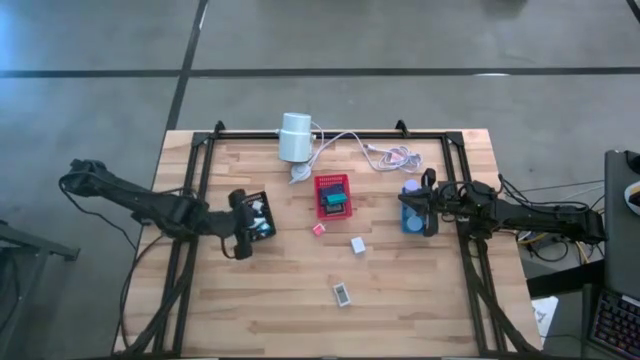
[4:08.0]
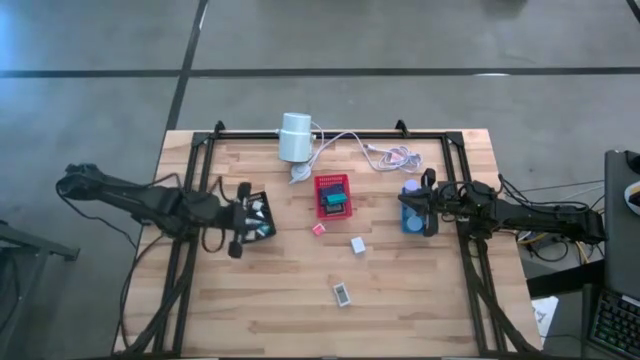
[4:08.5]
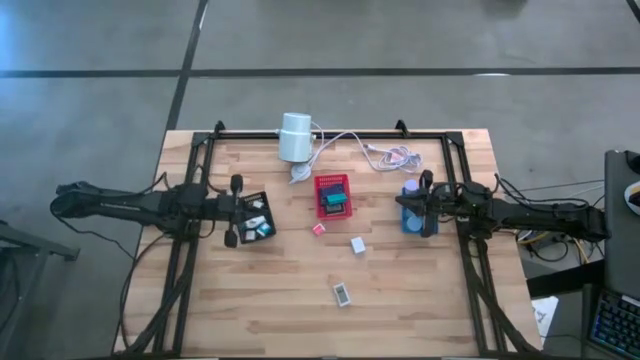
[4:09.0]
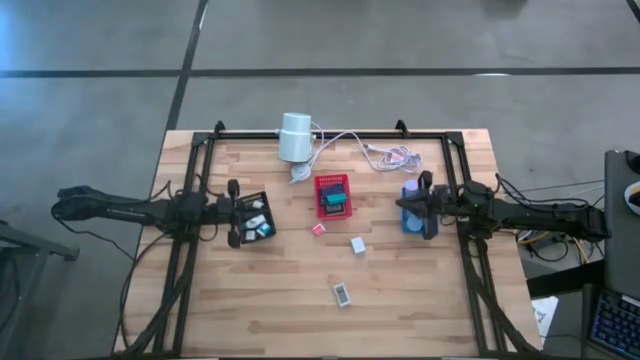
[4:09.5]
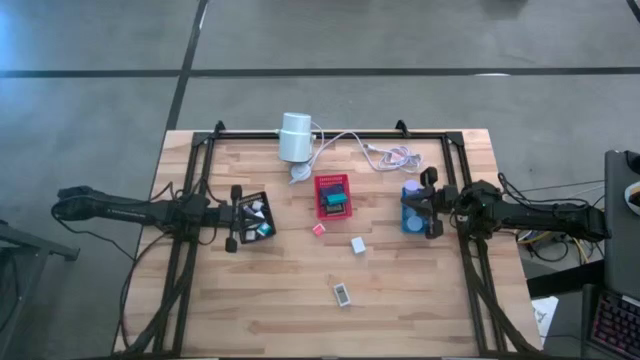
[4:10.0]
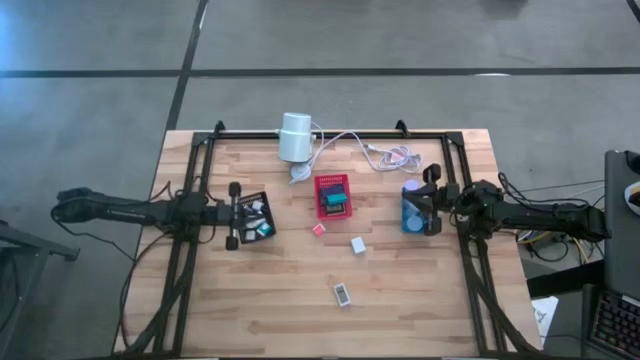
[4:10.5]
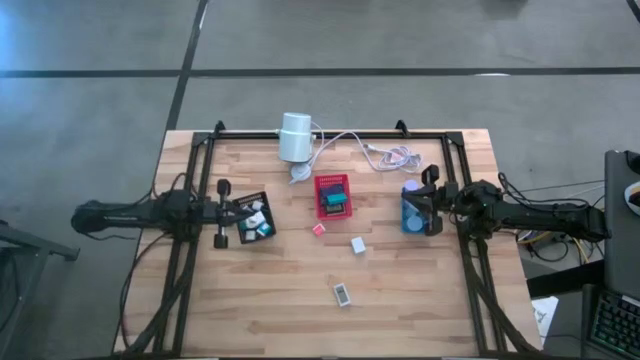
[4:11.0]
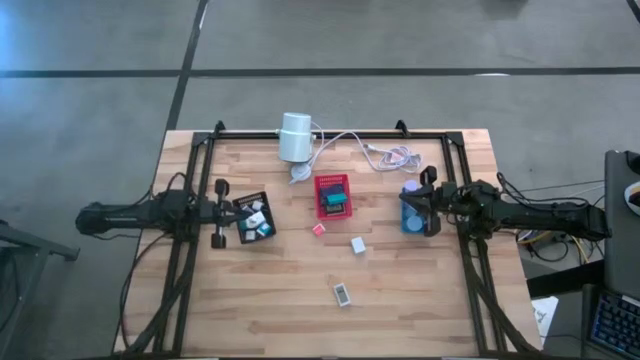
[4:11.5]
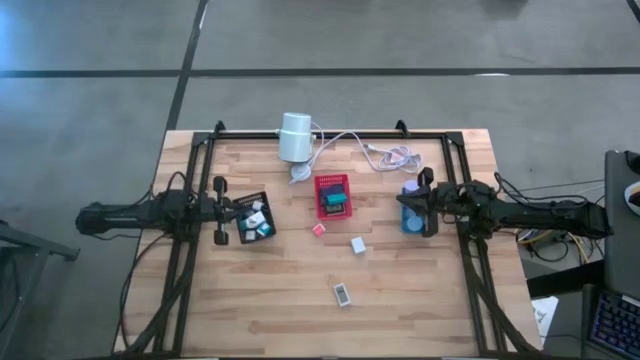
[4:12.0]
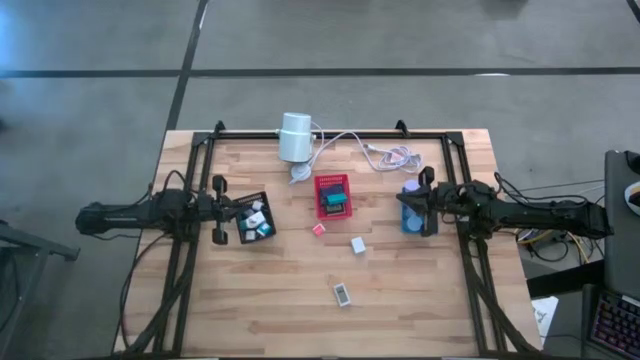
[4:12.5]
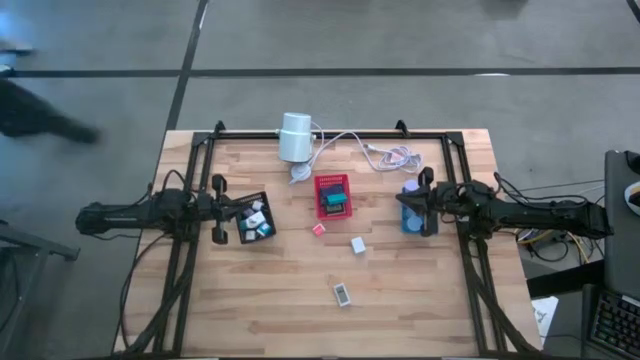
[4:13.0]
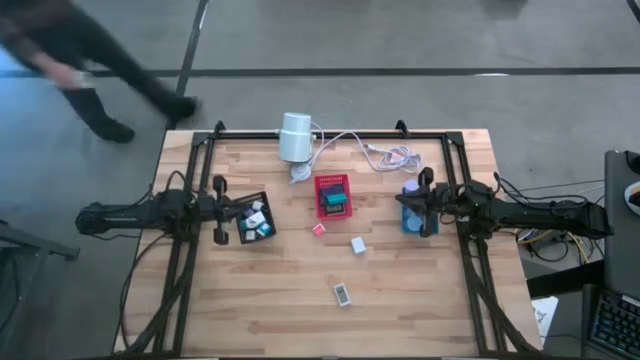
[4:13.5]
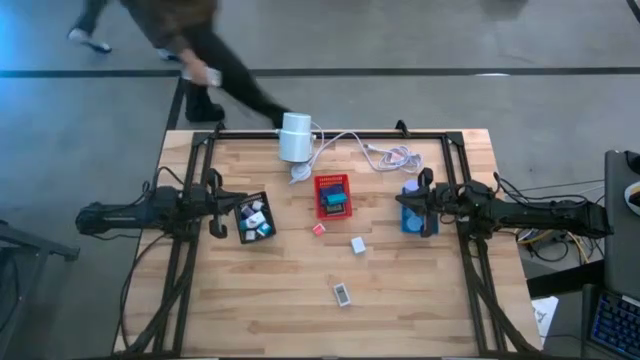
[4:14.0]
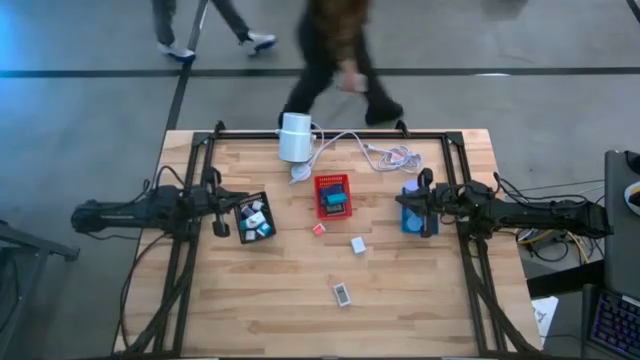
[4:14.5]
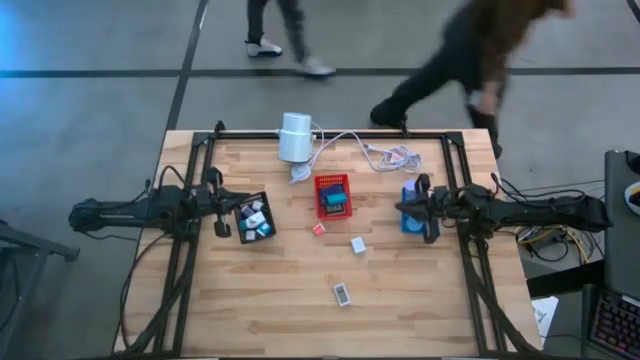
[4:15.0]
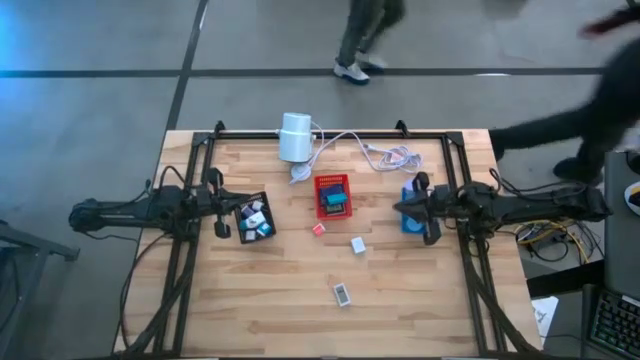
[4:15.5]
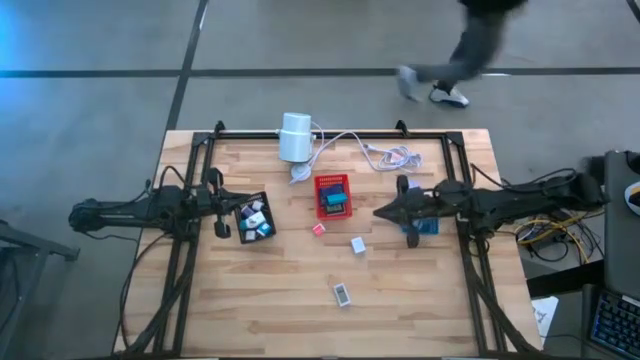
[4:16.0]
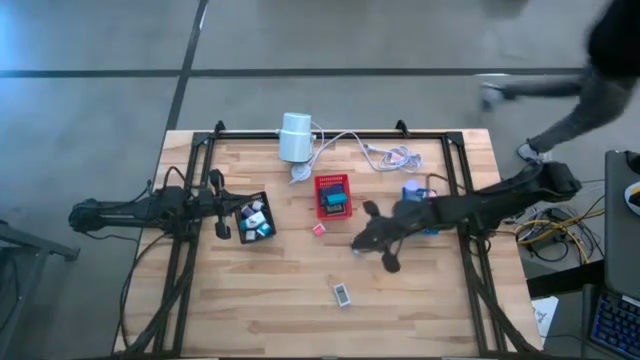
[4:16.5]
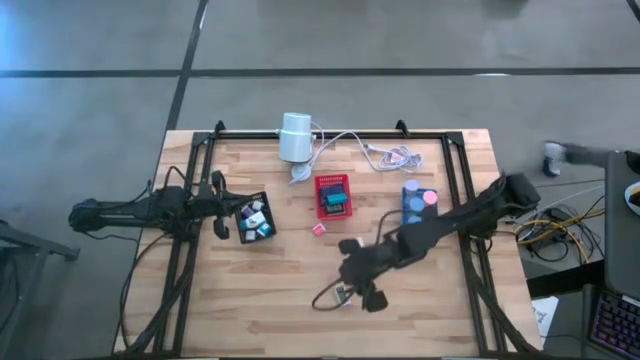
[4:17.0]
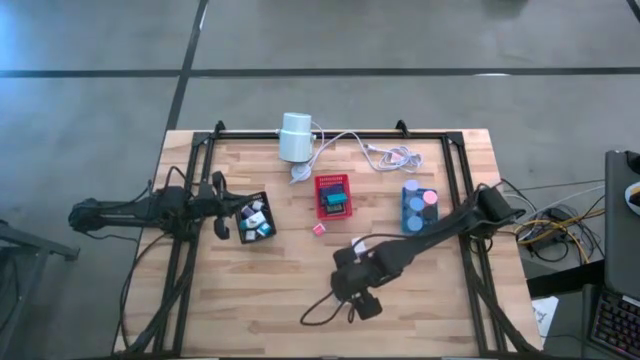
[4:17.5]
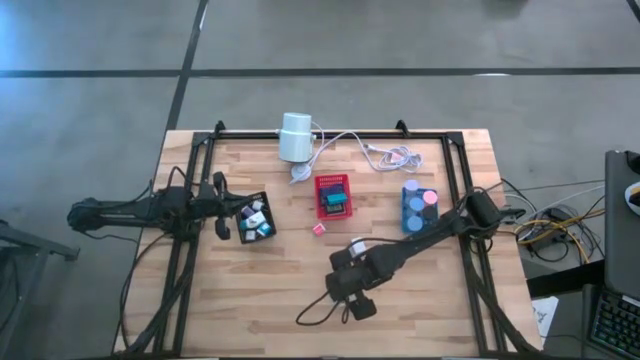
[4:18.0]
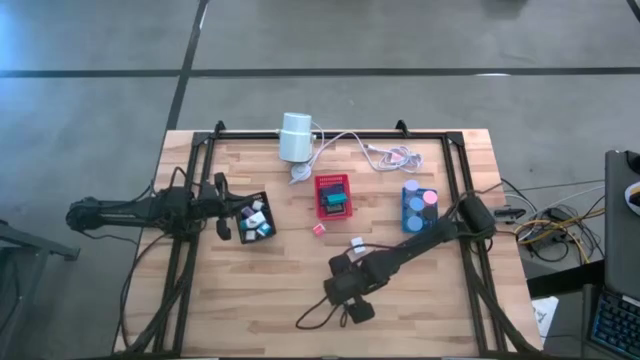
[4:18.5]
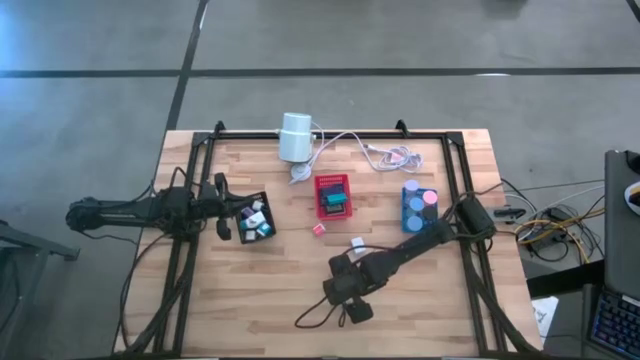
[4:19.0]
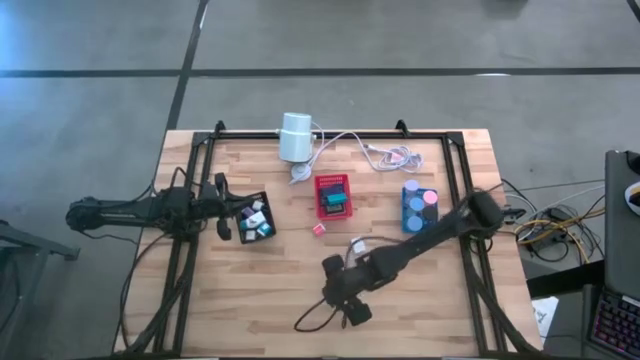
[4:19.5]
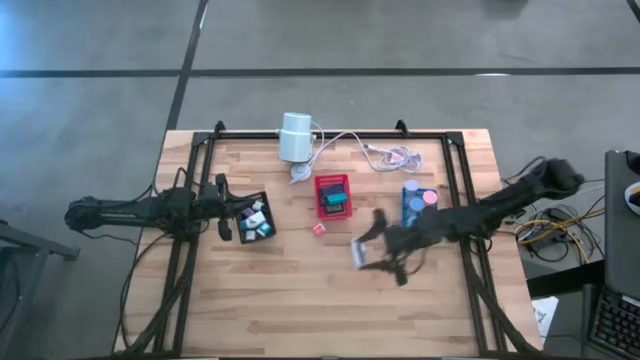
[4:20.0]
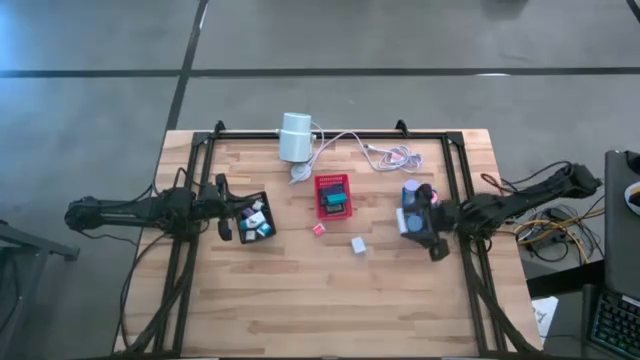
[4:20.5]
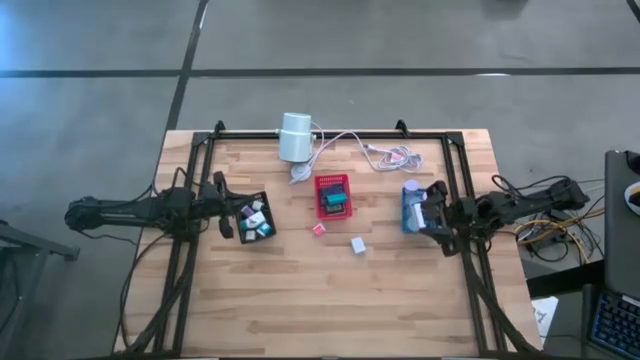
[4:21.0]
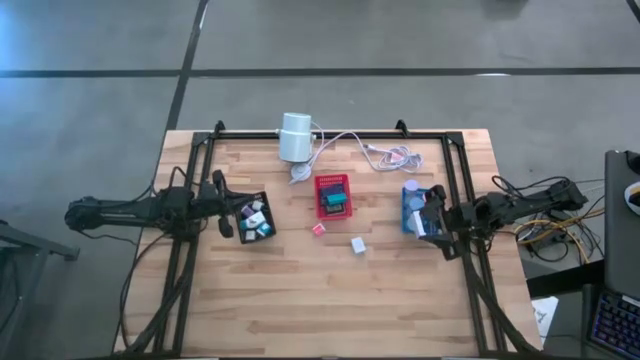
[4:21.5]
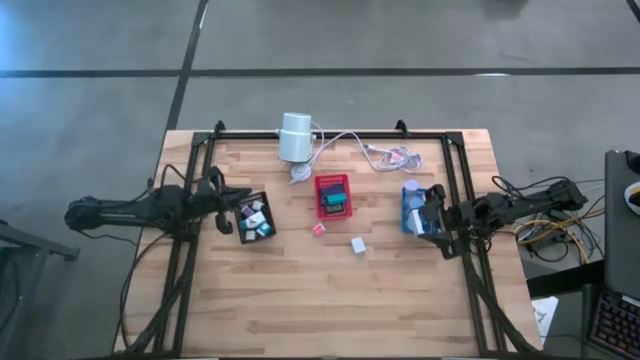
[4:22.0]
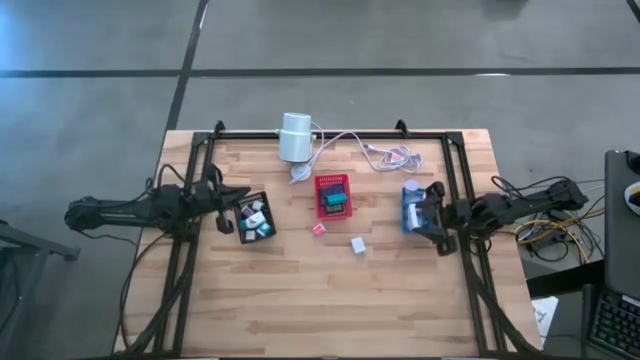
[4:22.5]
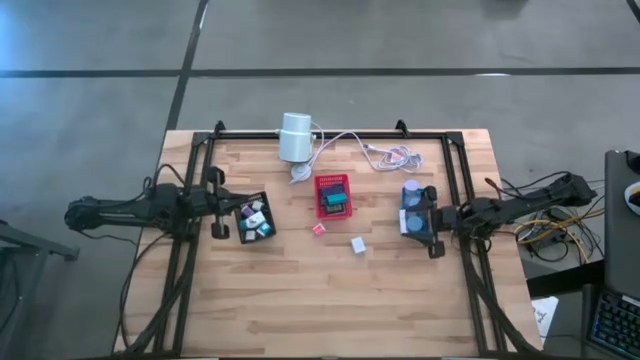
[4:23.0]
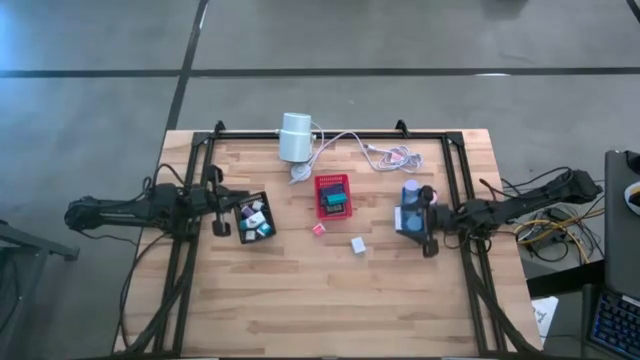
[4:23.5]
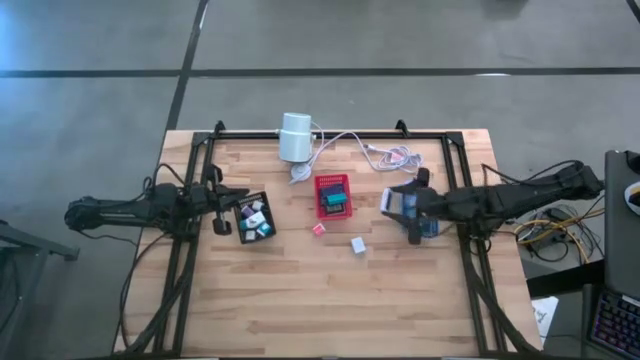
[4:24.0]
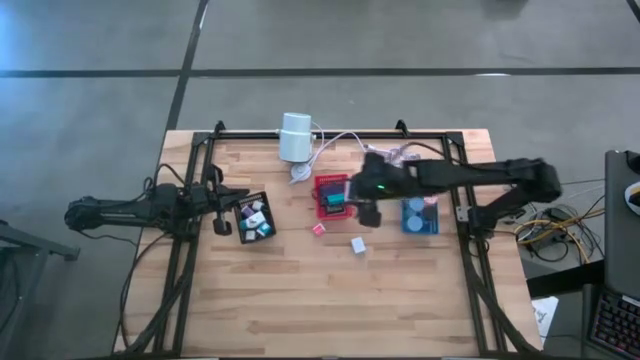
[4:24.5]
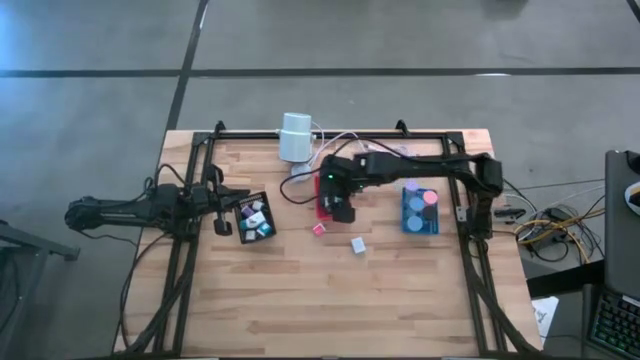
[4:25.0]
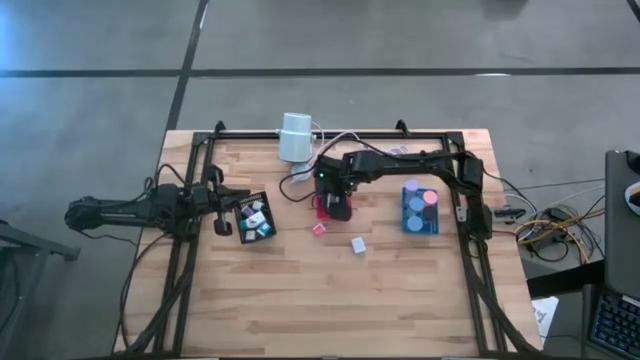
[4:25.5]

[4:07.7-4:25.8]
Task: Pick & Place Office items
Put the white digital clock into the red basket

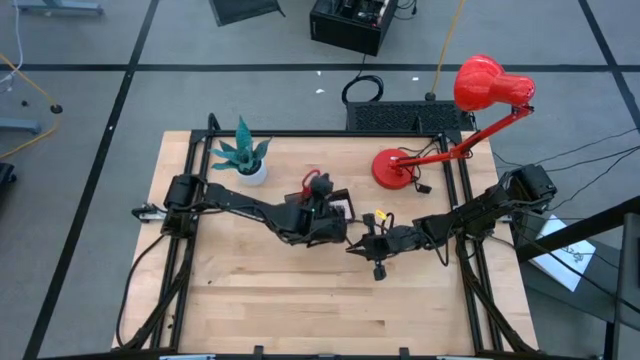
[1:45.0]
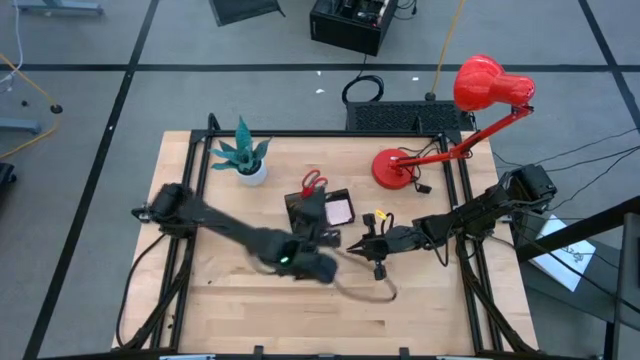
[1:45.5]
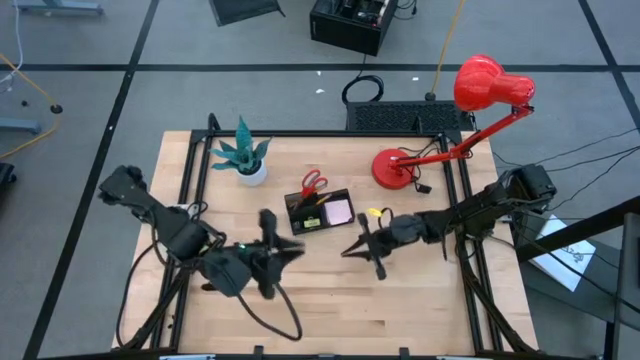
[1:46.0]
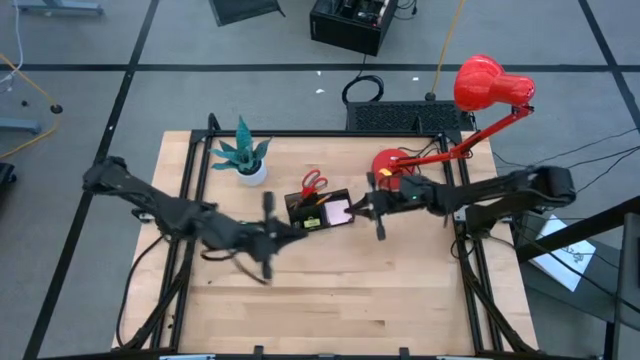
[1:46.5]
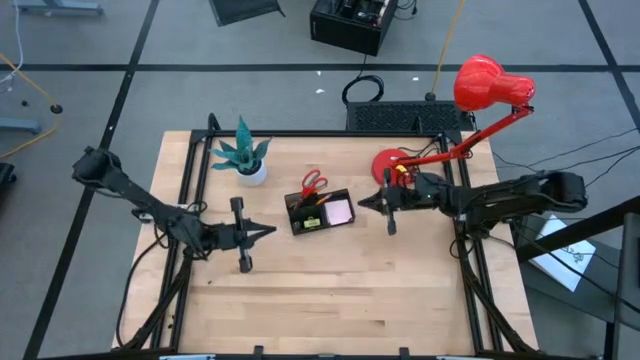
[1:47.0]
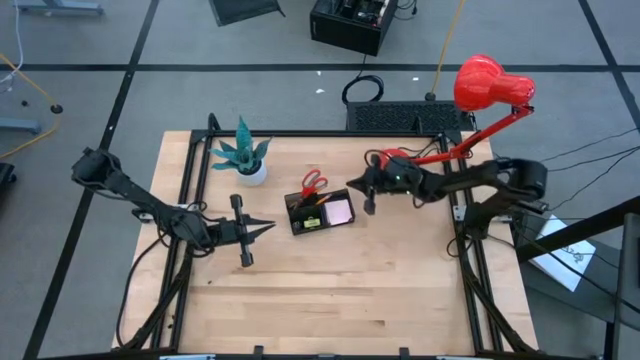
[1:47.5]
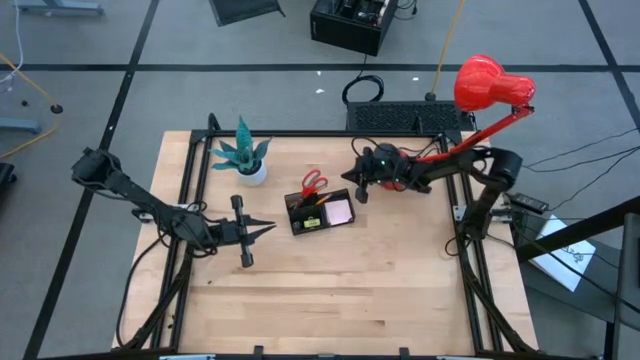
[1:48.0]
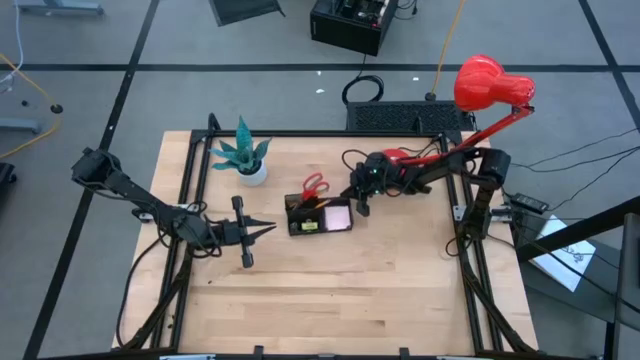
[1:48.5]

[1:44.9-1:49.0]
Task: Pick and place office supplies into organizer
Adjust the black desk organizer
